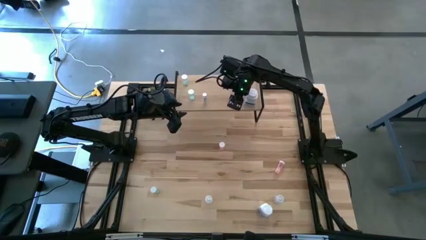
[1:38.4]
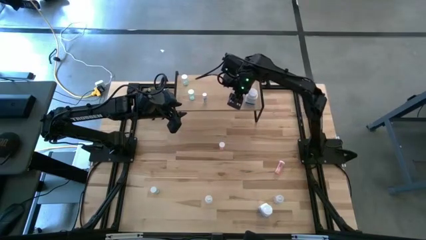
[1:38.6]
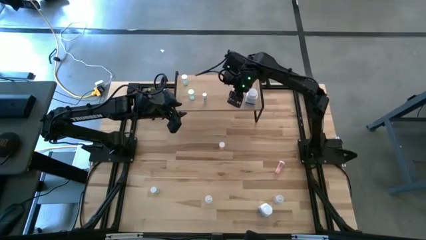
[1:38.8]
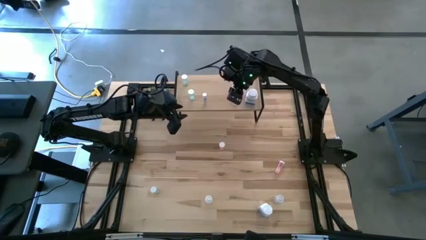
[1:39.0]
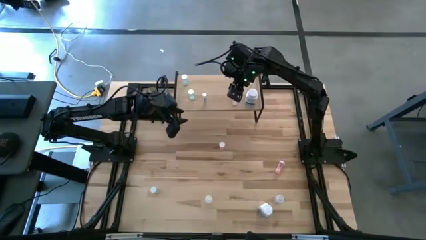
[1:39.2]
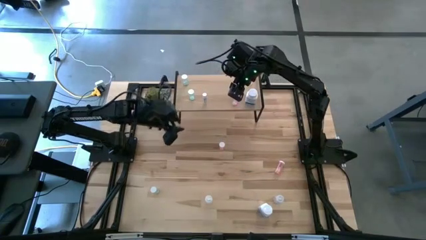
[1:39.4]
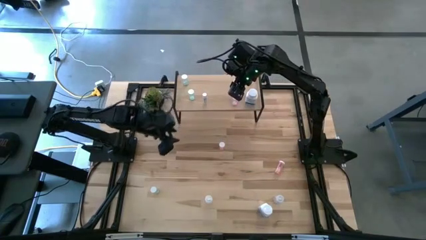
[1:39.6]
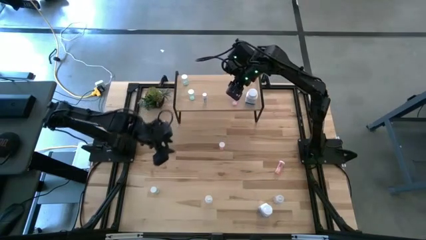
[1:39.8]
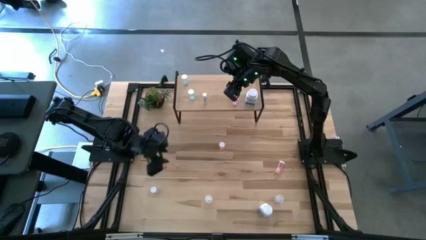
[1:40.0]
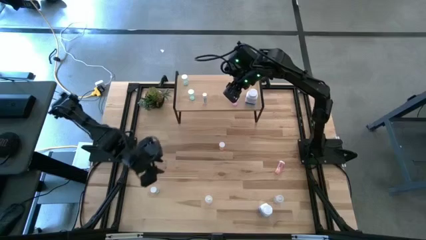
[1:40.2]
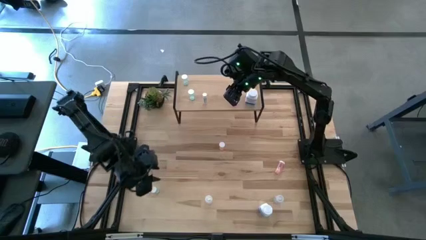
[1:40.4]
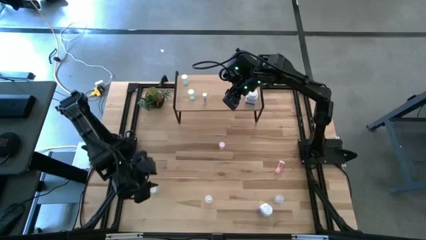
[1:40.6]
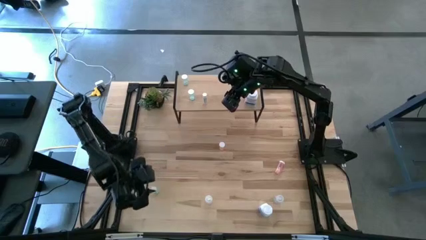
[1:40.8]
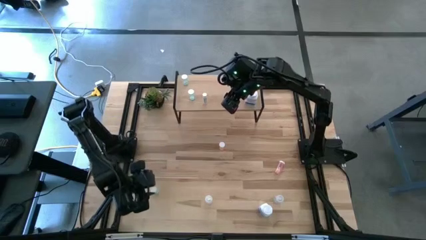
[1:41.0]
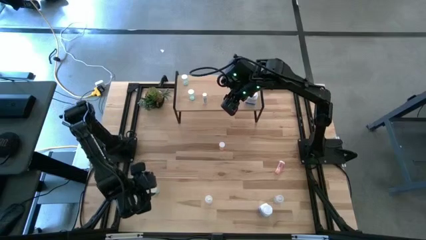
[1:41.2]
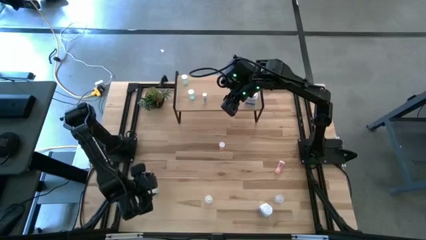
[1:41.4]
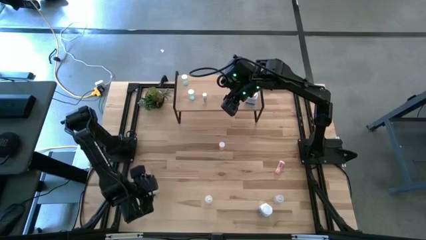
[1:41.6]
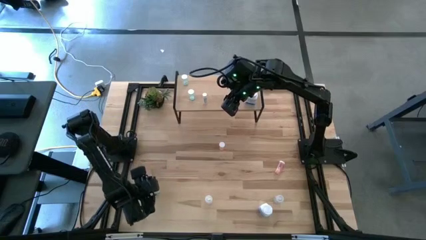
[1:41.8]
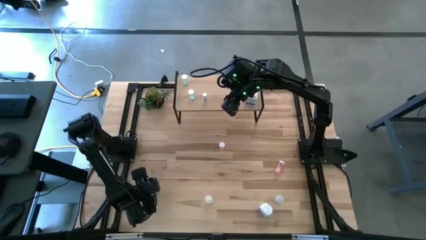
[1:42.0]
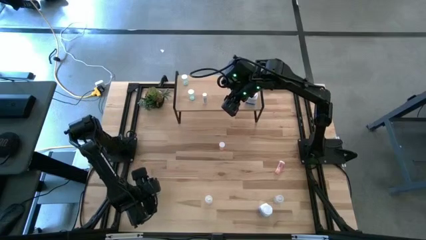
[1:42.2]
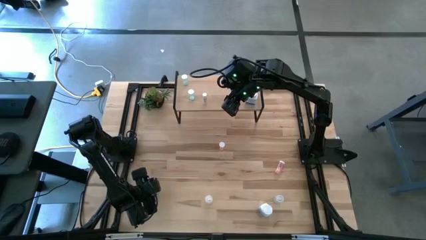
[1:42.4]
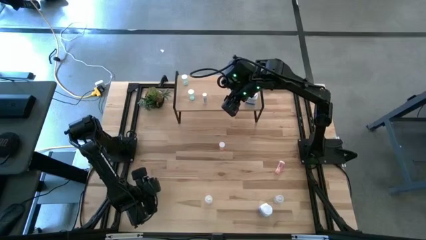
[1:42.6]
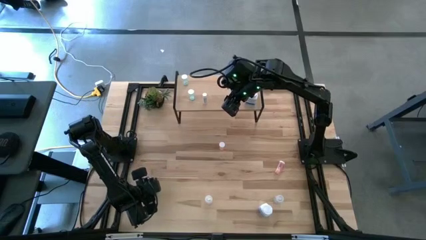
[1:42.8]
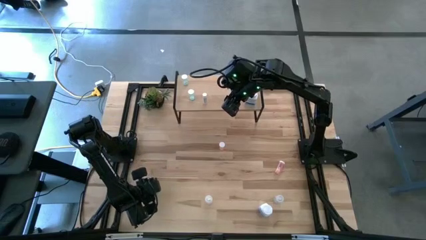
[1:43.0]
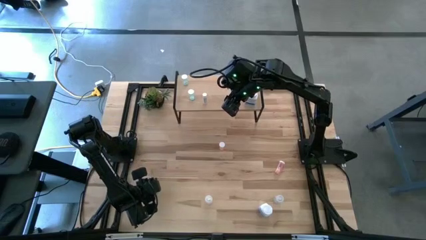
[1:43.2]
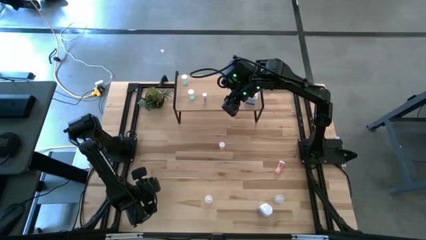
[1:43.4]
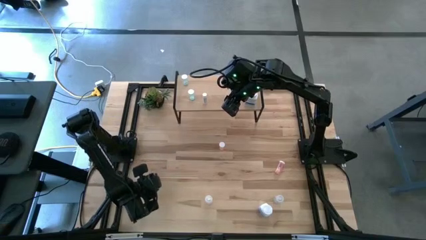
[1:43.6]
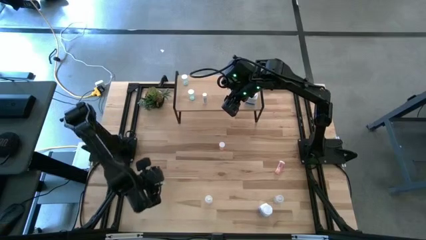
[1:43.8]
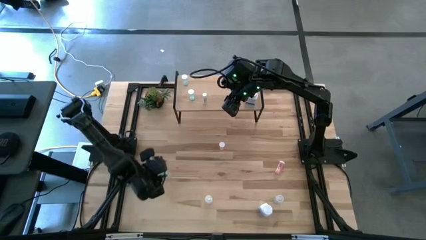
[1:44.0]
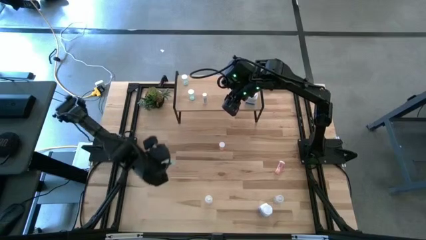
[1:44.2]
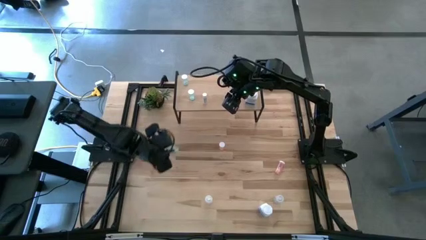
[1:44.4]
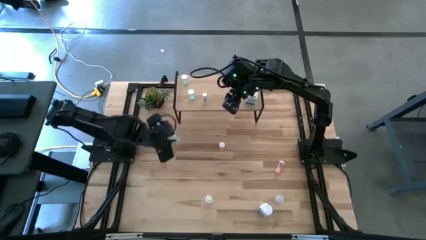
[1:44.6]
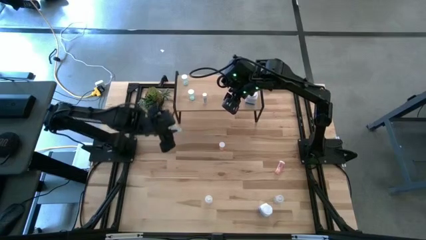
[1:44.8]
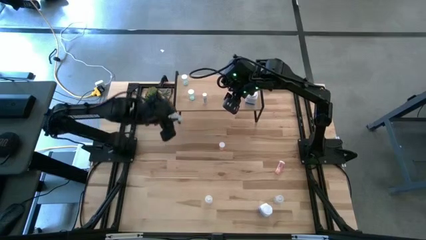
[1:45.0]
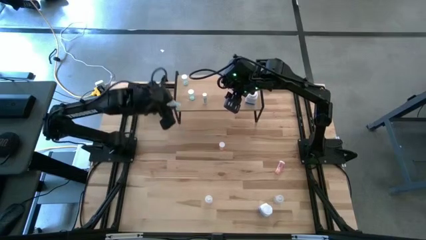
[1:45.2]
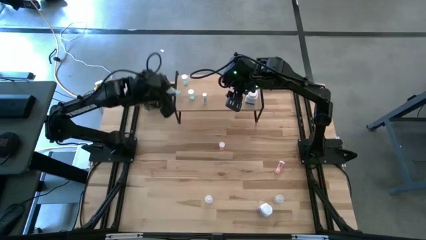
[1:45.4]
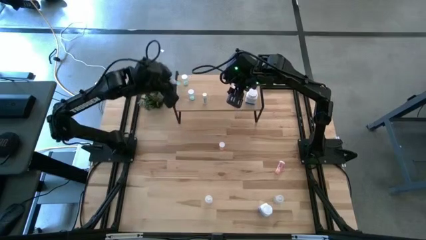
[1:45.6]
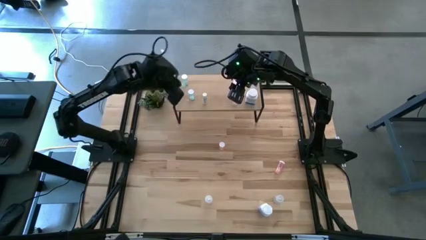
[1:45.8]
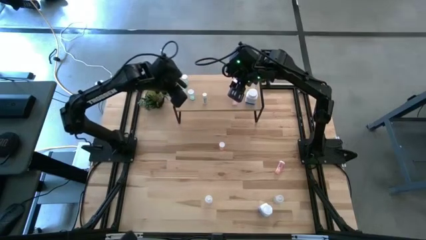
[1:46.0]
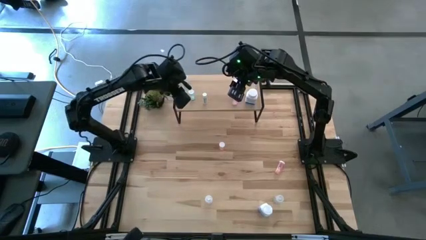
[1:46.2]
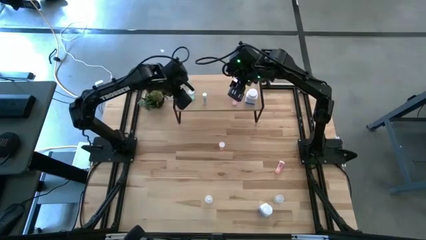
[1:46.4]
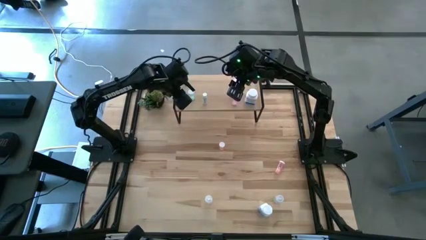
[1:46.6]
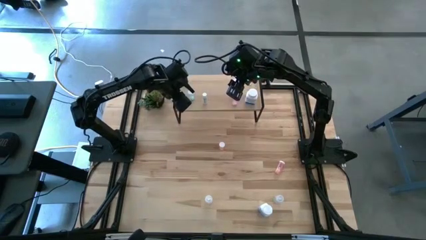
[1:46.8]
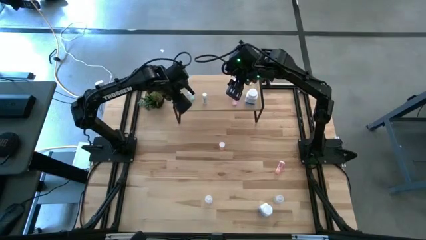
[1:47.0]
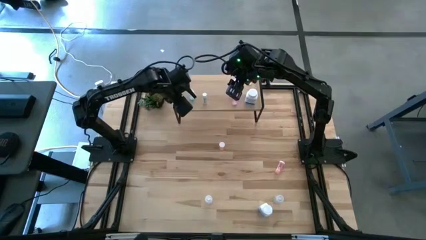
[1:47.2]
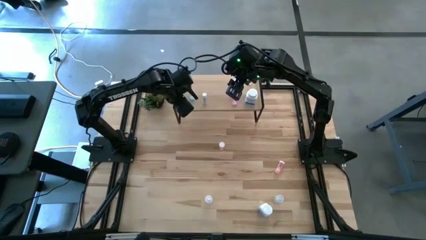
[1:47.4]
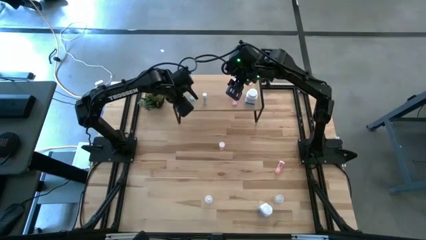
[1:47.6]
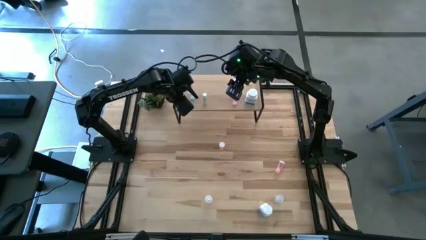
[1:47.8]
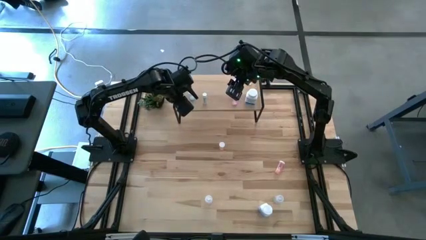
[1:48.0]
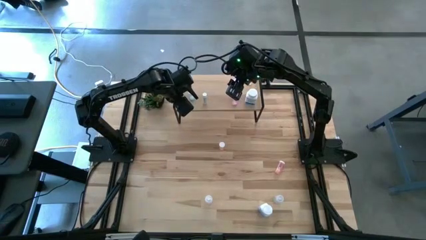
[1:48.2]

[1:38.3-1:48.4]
Task: Pick and place medicine bottles onto shelf by color
Put the green pill bottle on the shelf

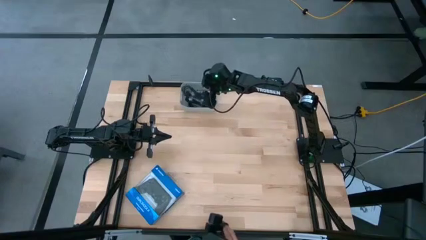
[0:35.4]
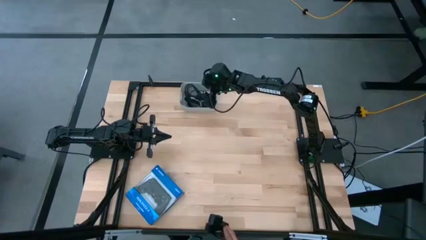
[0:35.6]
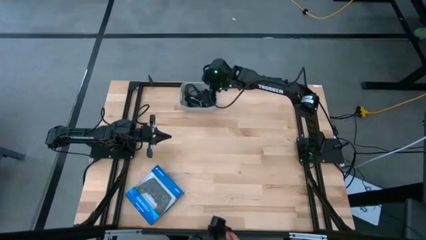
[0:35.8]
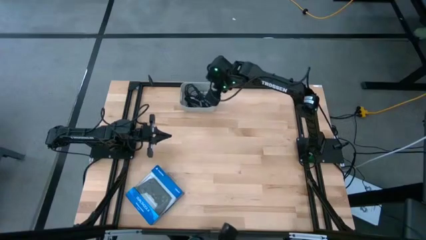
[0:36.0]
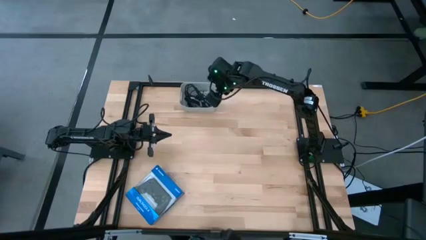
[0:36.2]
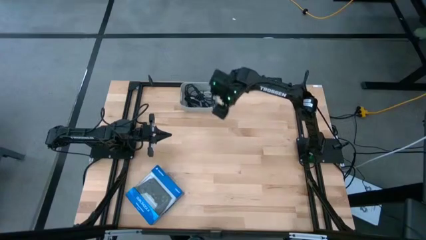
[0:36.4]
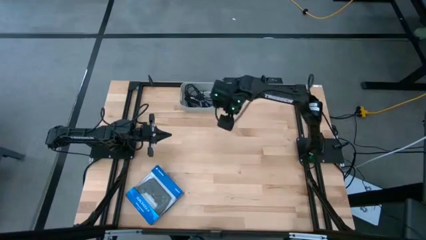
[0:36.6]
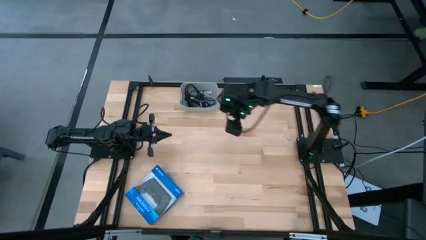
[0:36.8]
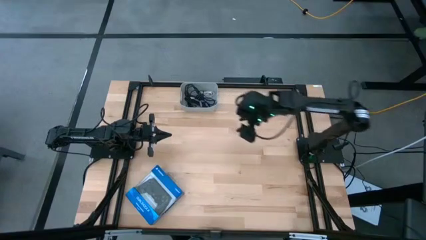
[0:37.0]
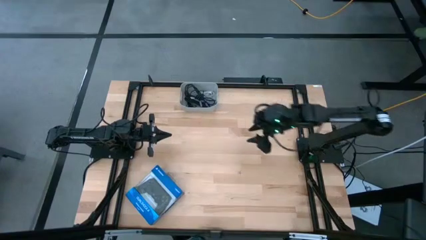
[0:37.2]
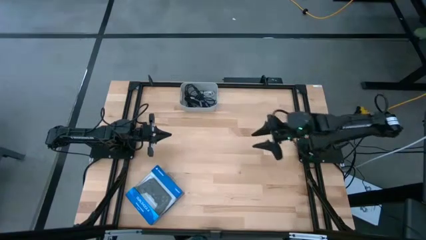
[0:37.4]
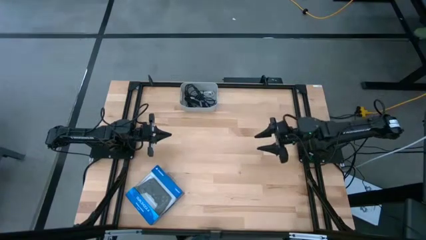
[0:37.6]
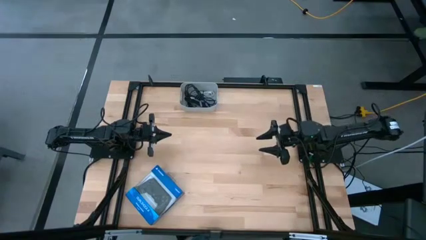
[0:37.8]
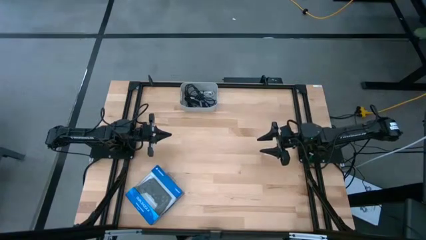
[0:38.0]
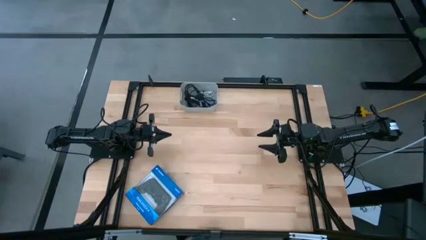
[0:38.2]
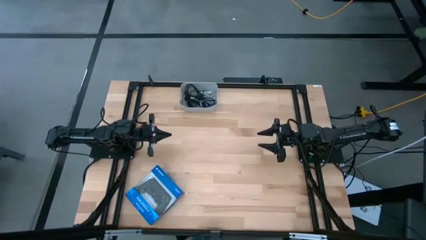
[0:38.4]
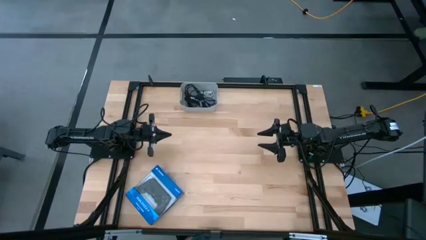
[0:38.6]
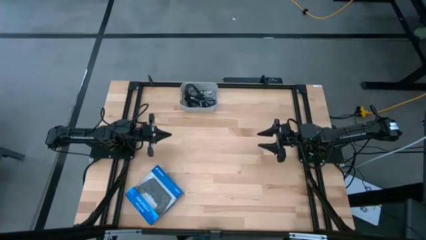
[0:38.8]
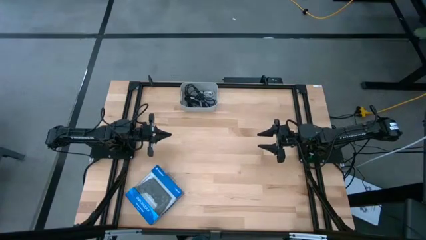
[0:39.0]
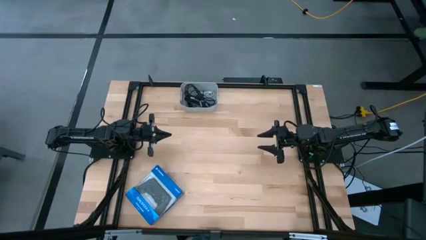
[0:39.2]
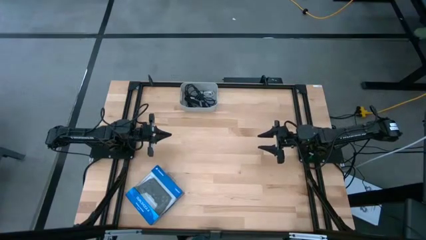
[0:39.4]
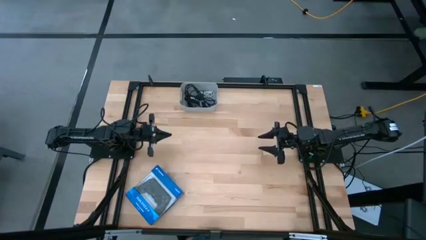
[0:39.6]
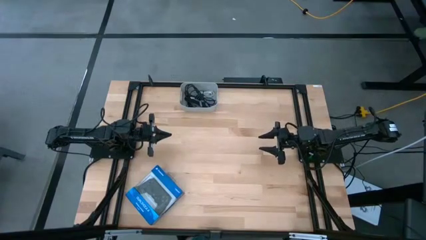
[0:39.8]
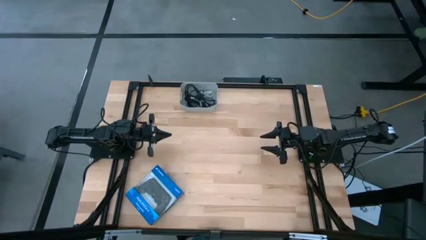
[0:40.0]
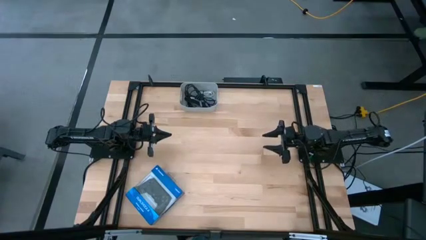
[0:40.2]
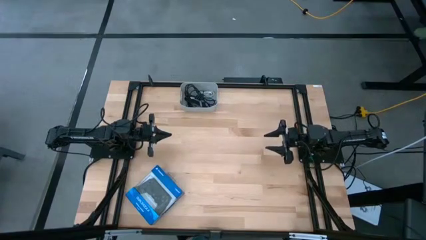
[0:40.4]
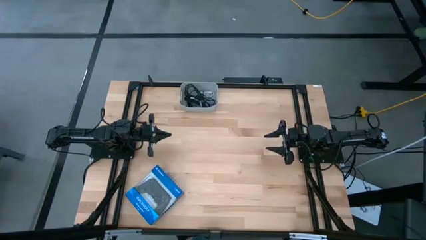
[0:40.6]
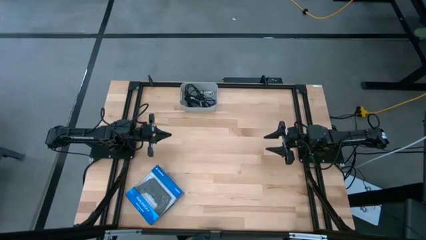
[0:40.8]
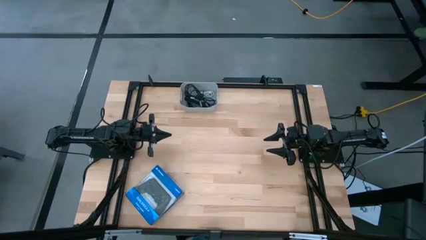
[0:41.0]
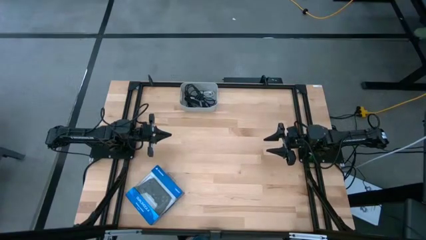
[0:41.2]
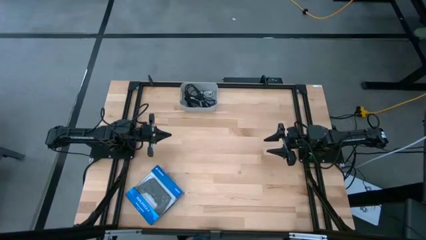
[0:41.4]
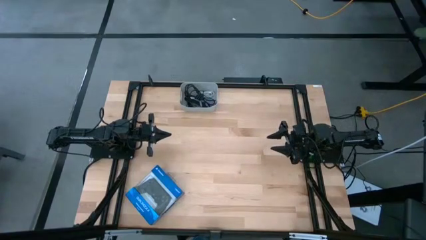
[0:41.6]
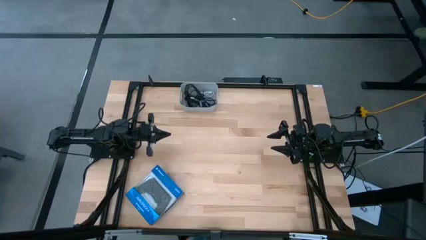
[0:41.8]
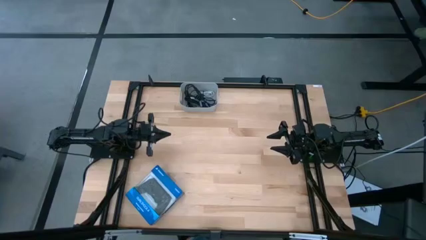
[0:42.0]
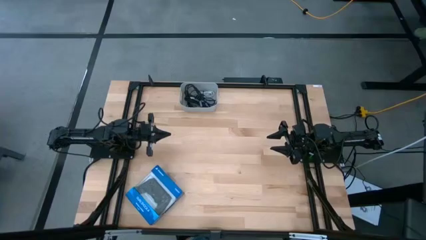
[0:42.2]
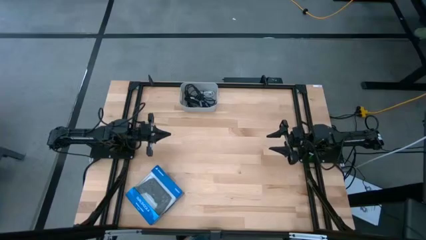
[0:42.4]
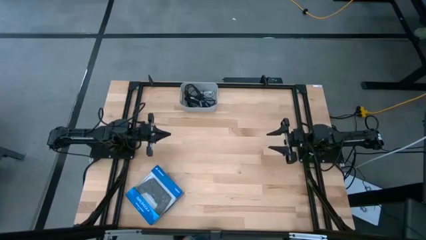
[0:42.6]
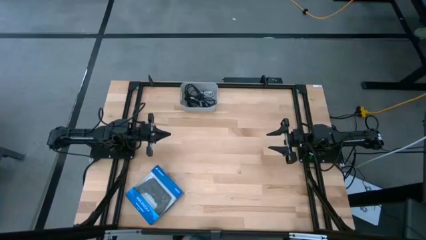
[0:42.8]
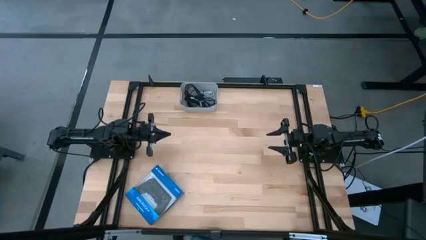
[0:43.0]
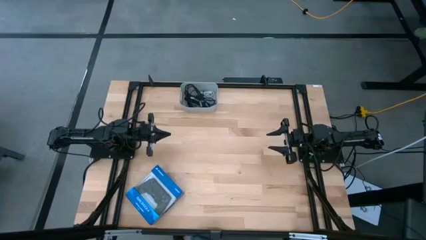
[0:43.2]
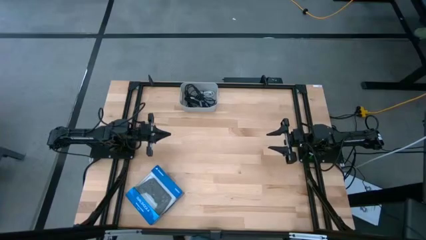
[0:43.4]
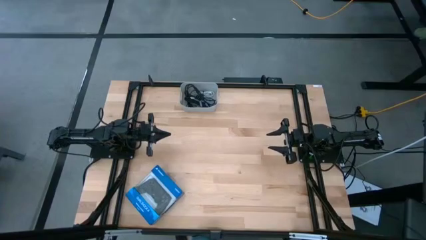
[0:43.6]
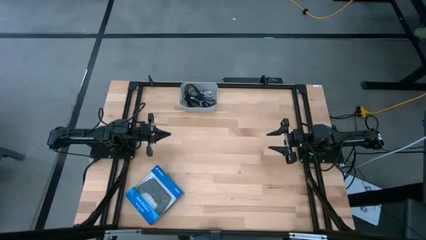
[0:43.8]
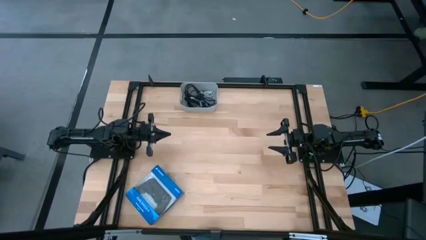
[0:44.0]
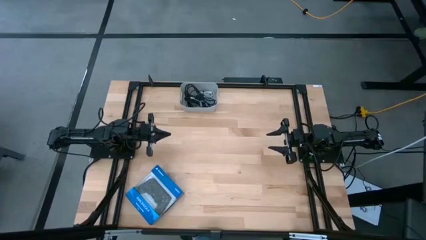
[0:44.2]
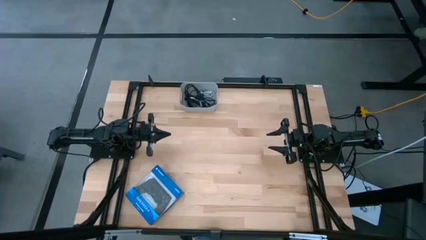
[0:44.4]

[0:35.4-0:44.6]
Task: Pick and place USB-C Cables
Return to Home Position
